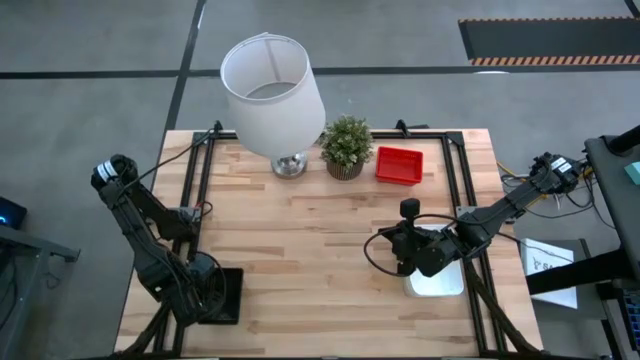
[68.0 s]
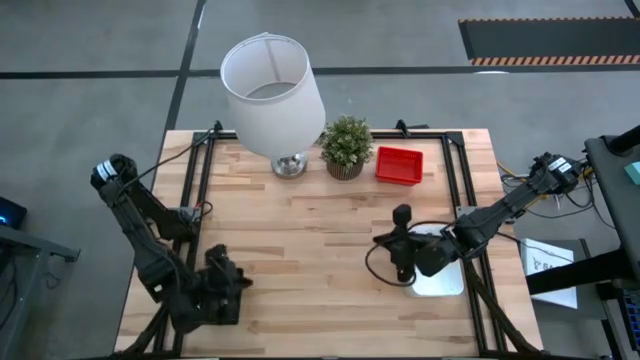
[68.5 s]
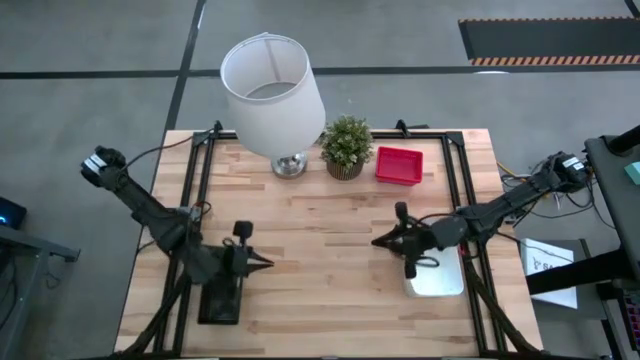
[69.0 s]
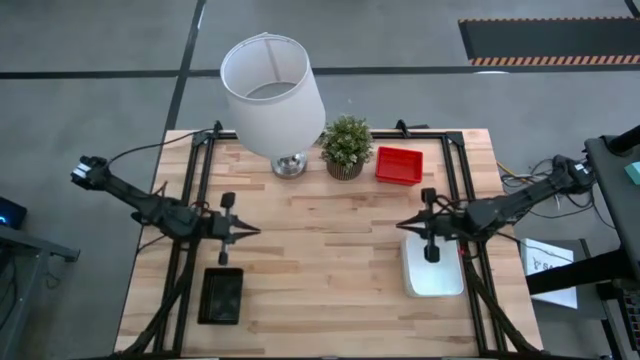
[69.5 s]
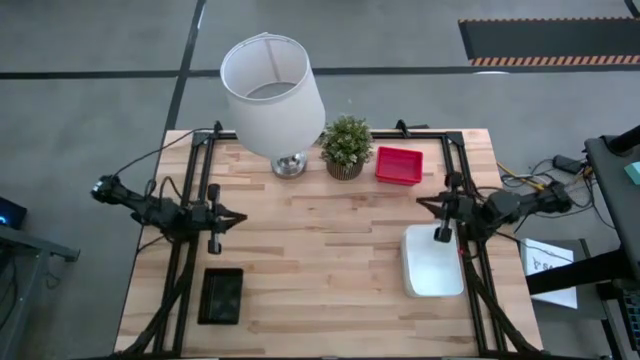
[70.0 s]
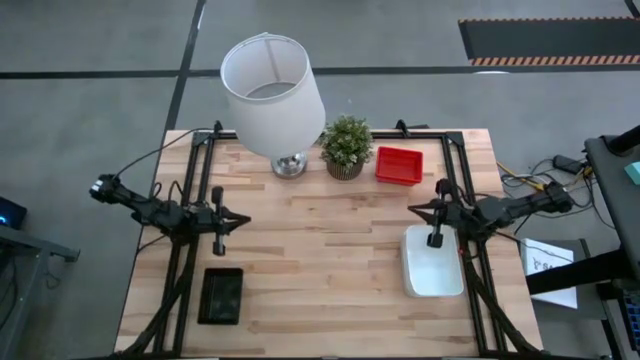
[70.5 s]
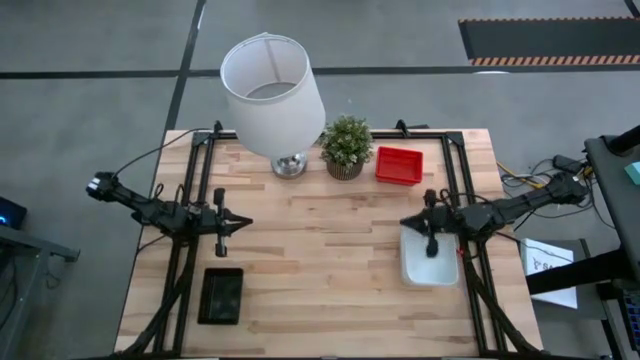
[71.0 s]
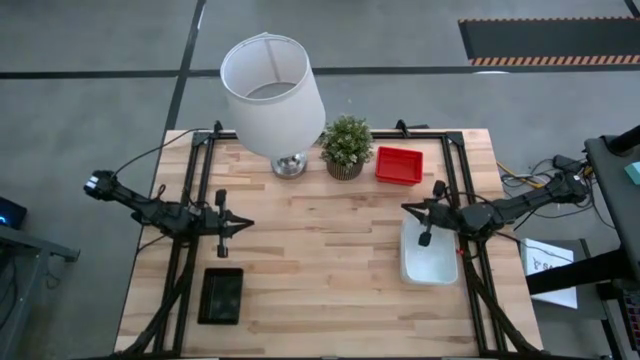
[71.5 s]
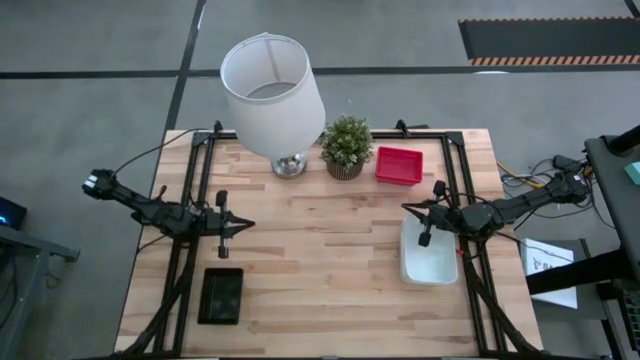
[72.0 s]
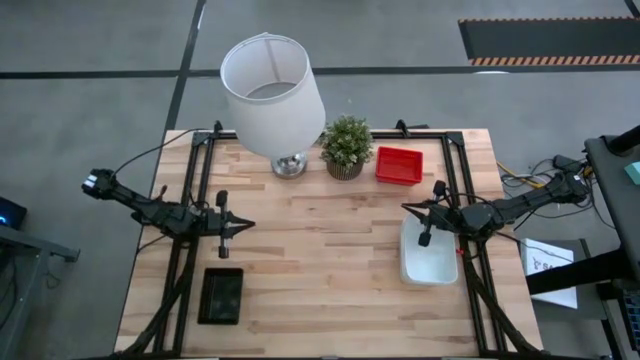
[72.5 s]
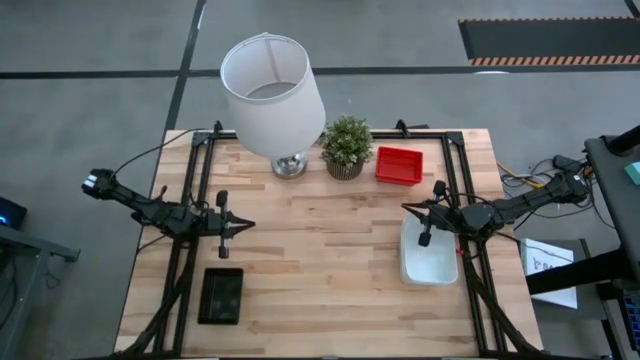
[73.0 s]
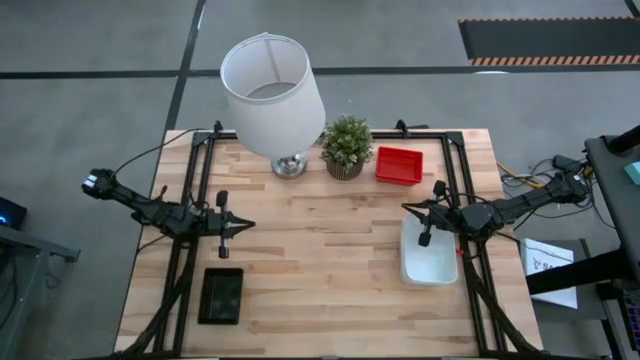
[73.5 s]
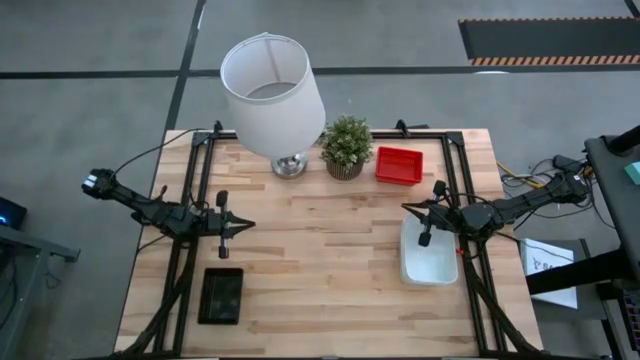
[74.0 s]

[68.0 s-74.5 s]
Return to Home Position

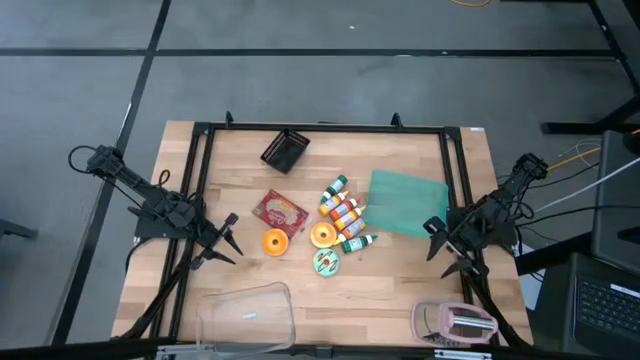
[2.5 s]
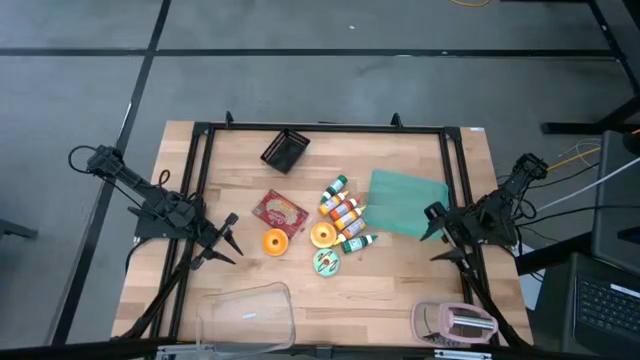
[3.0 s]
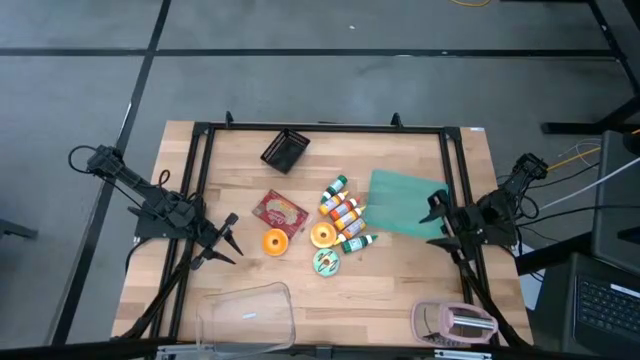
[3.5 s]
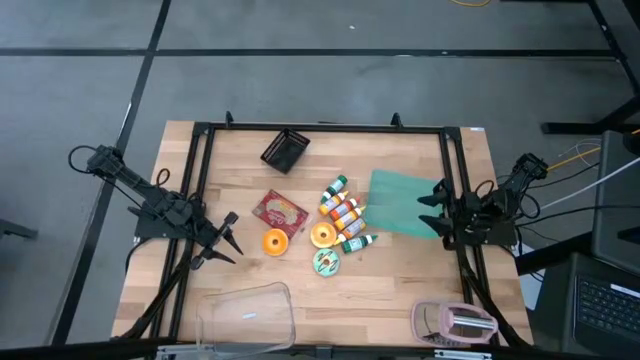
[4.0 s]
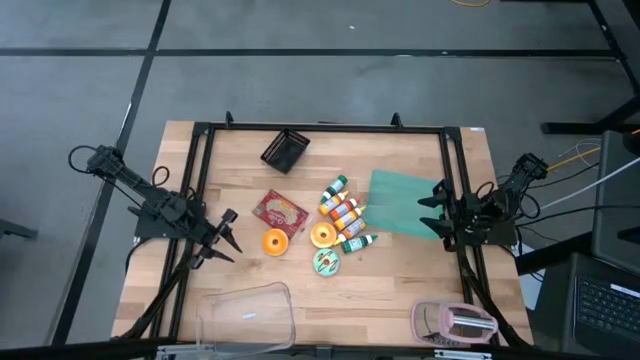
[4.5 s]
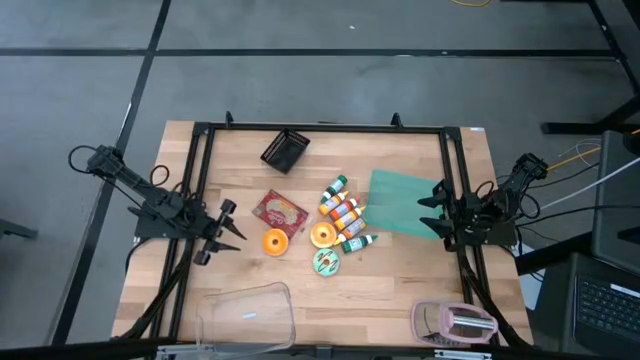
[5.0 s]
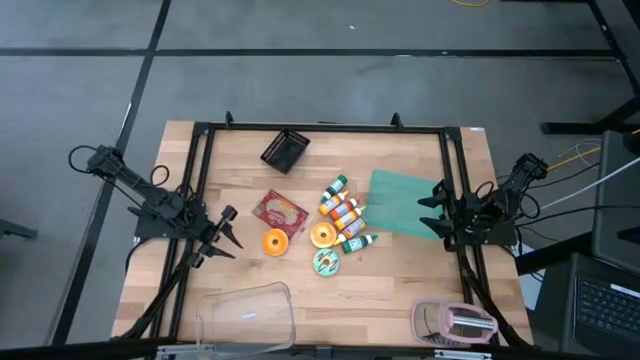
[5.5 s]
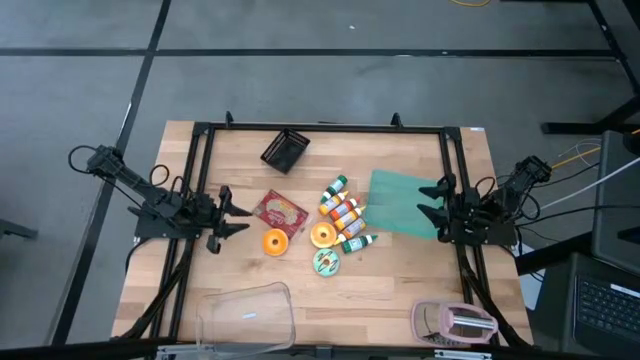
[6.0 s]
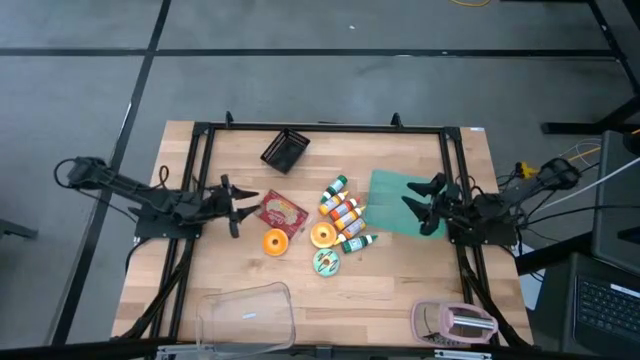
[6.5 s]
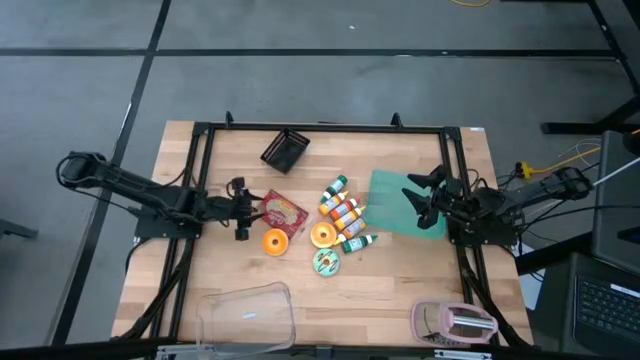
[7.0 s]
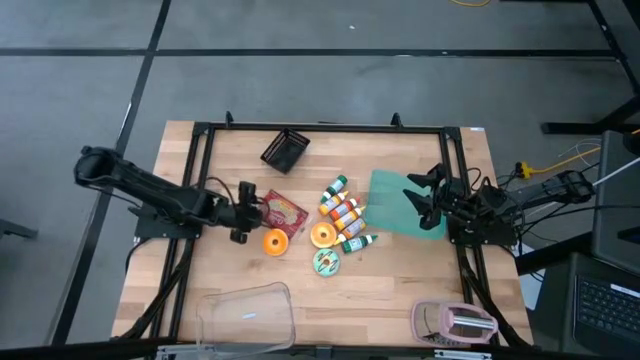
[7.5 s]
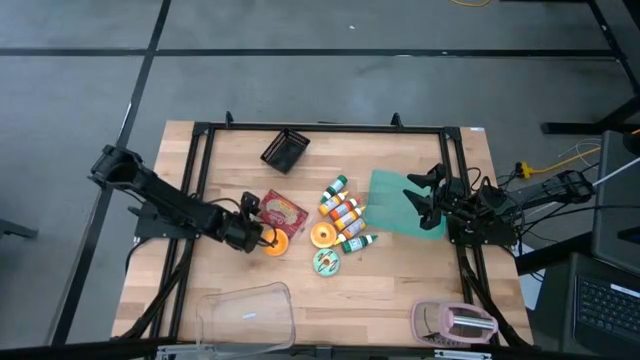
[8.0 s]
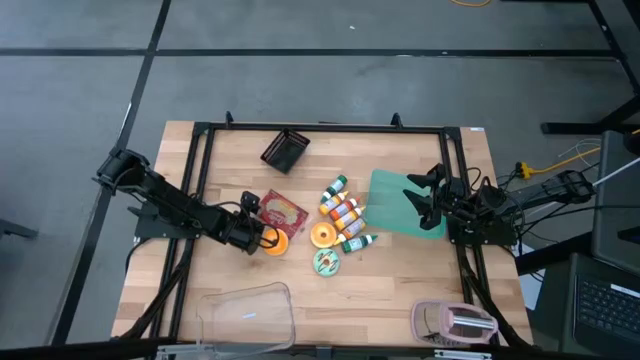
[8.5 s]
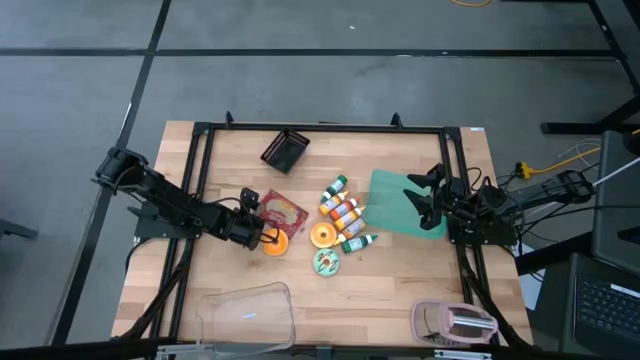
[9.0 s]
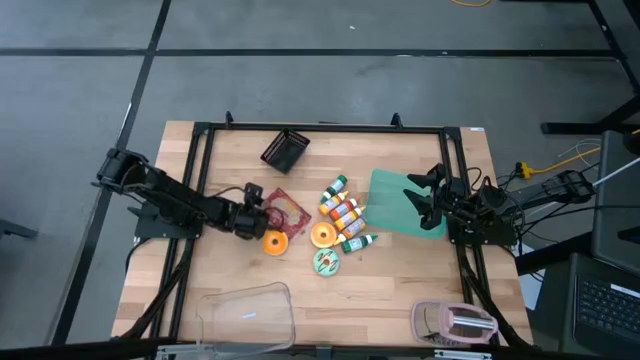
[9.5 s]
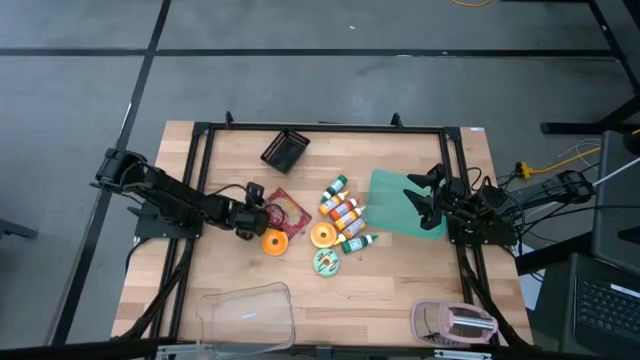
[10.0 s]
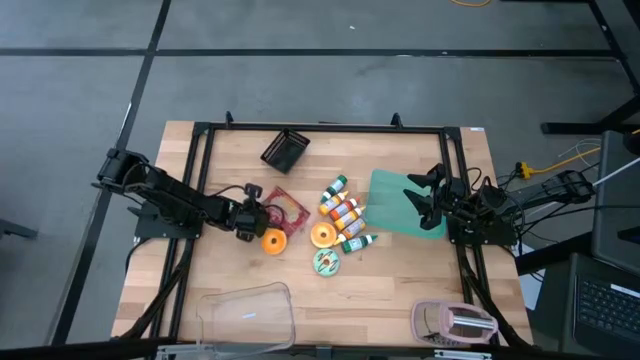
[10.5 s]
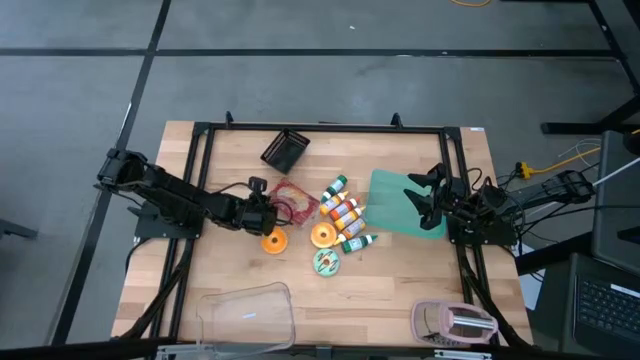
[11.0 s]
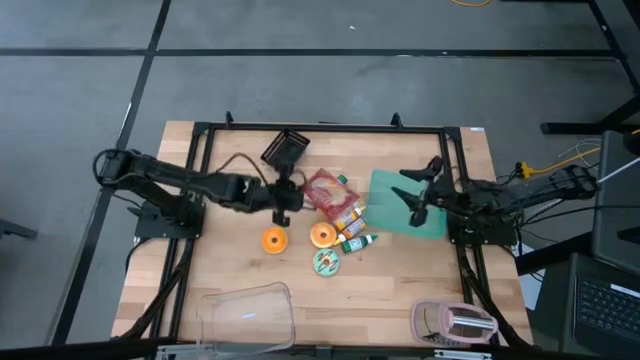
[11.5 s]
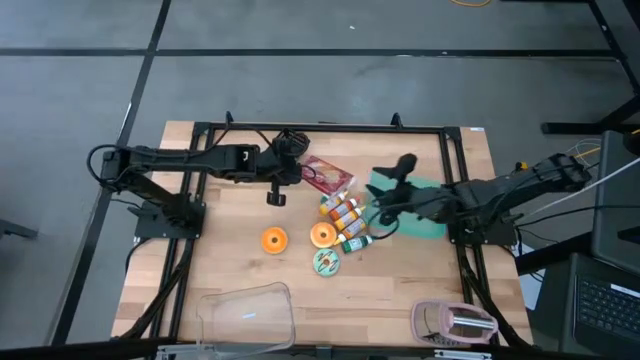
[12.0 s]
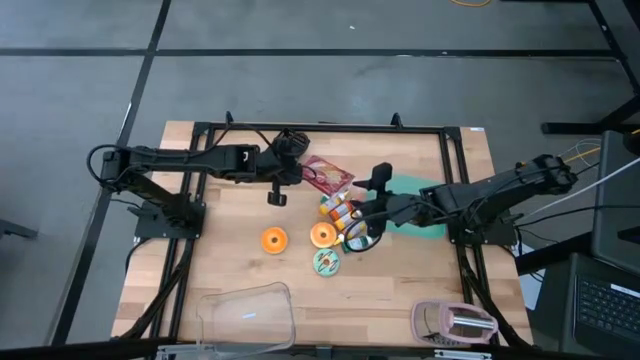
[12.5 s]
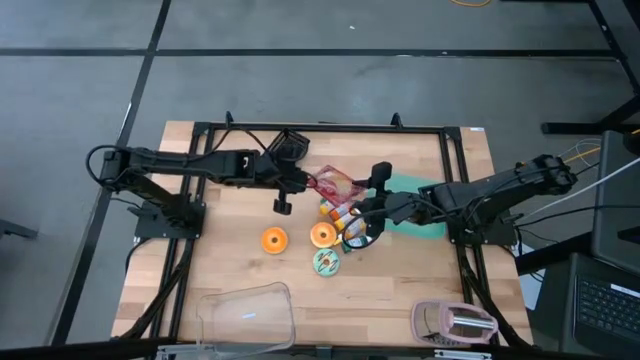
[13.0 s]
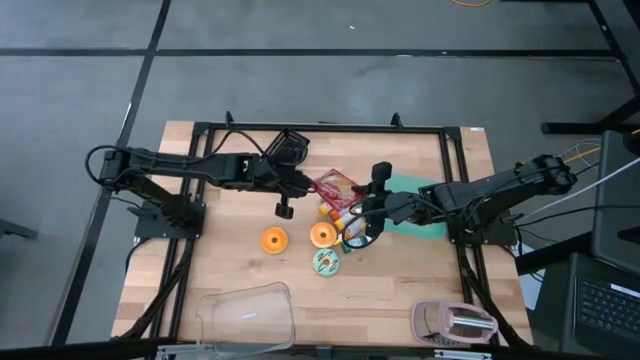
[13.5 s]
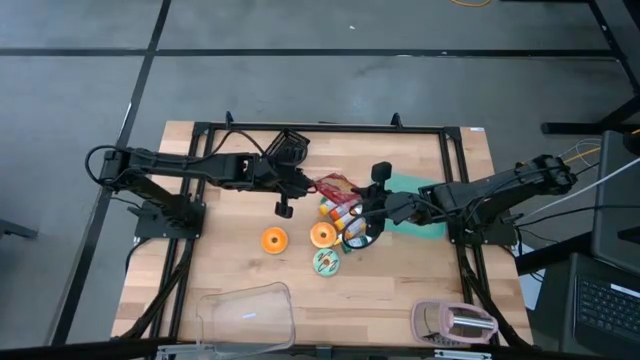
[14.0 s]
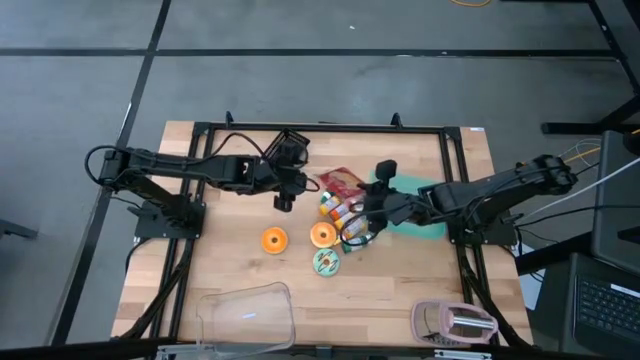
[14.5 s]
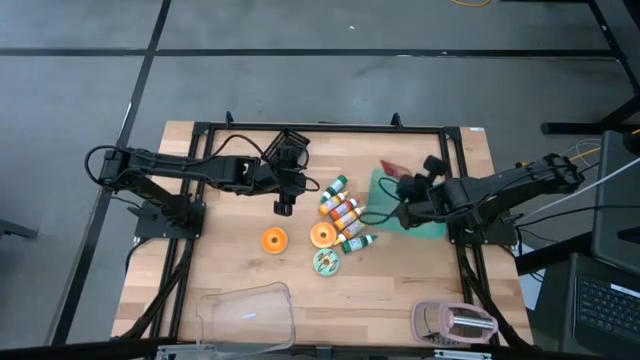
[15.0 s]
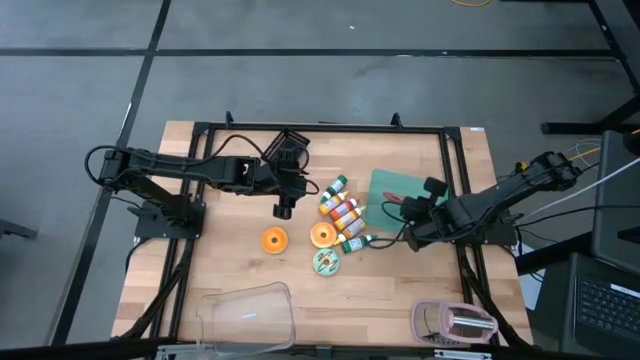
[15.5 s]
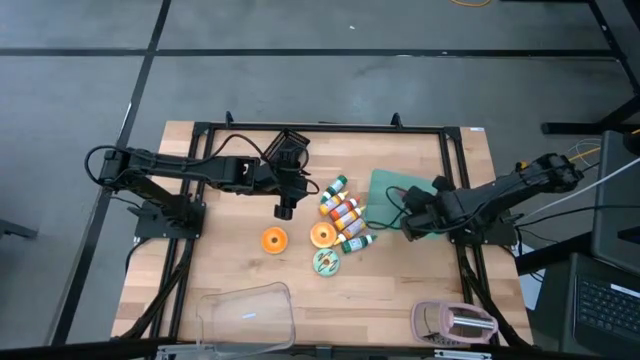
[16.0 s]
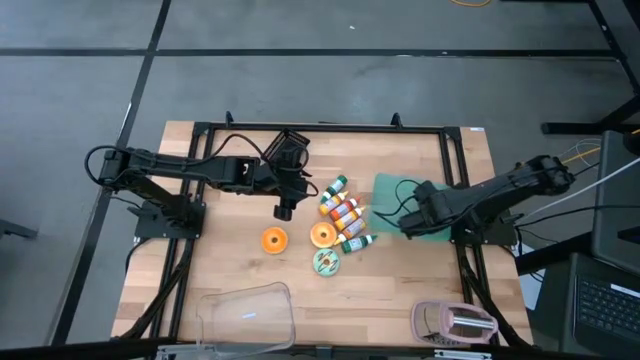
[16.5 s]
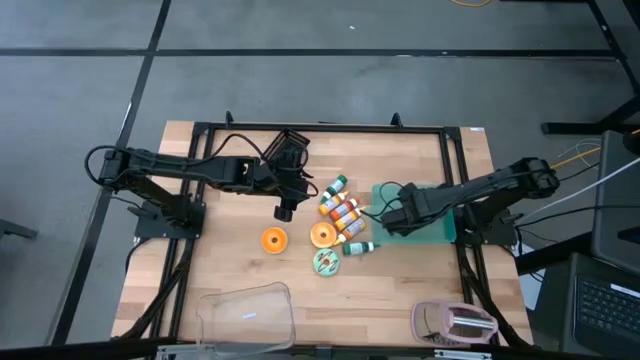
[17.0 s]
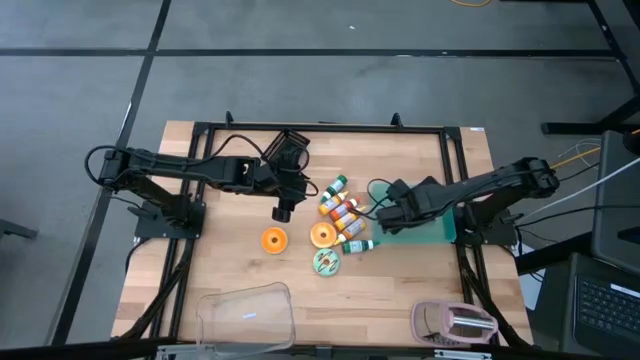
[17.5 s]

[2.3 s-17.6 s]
Put the red popcorn bag into the blue bin
